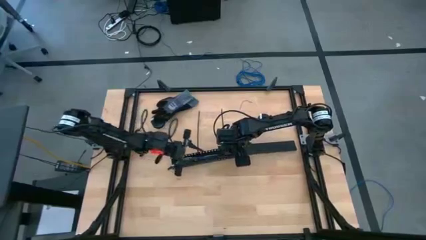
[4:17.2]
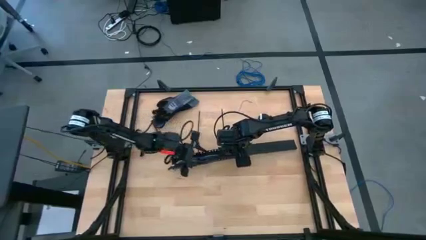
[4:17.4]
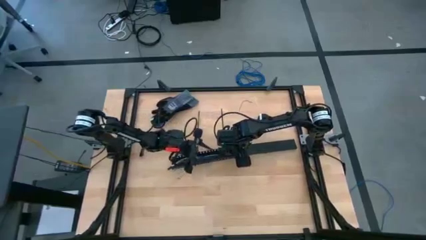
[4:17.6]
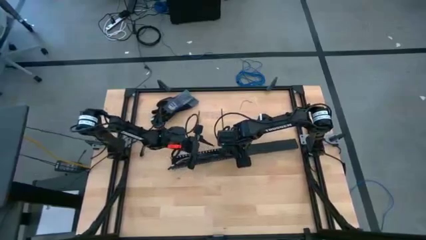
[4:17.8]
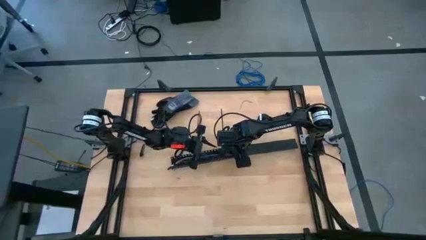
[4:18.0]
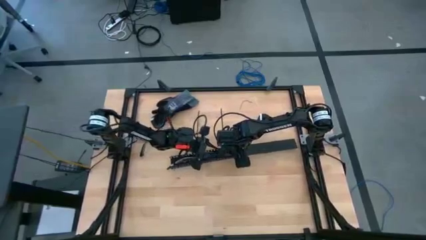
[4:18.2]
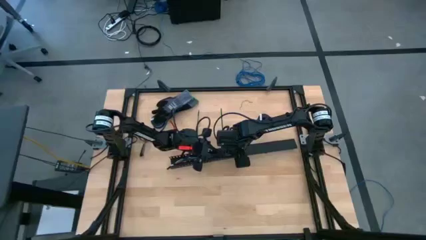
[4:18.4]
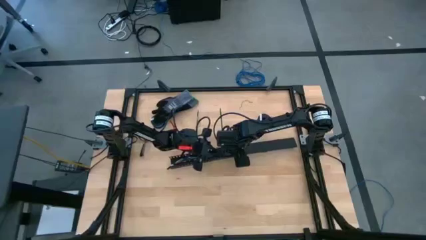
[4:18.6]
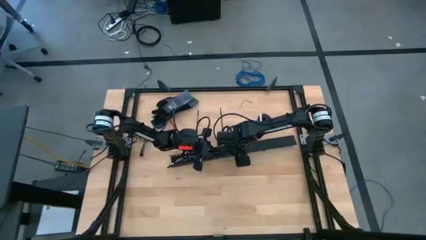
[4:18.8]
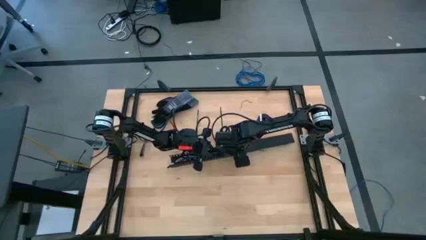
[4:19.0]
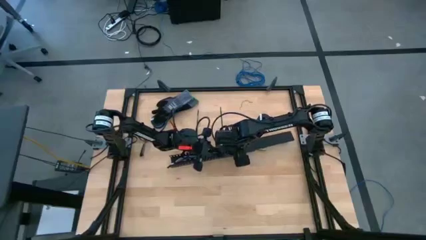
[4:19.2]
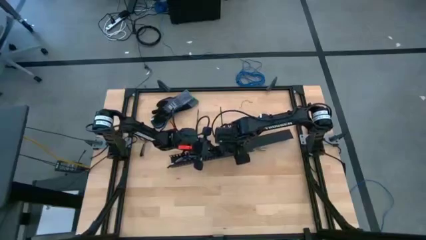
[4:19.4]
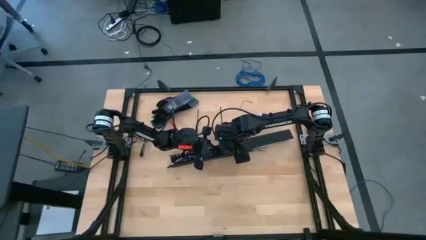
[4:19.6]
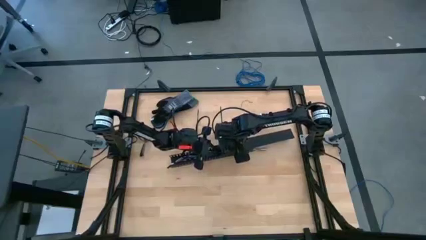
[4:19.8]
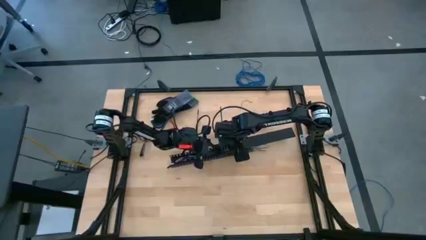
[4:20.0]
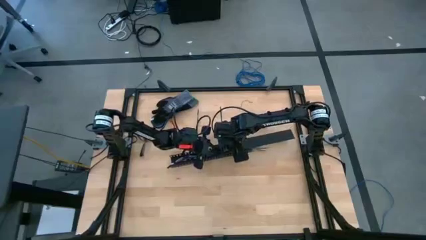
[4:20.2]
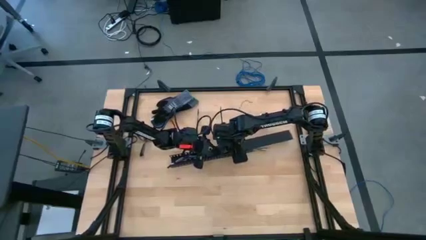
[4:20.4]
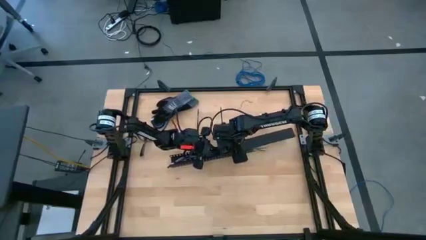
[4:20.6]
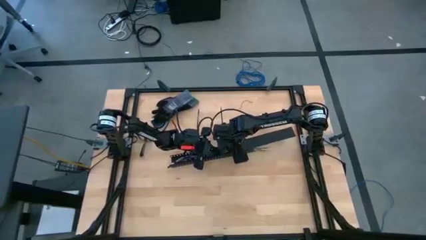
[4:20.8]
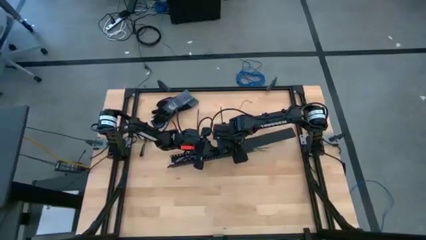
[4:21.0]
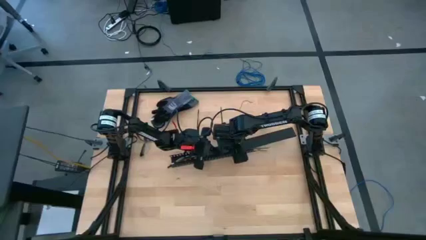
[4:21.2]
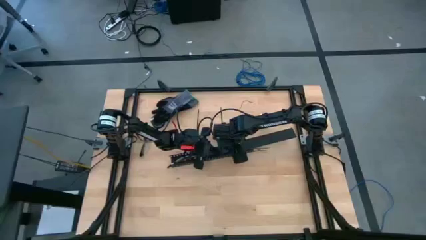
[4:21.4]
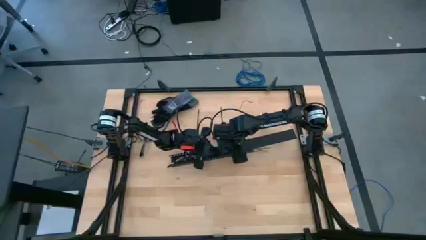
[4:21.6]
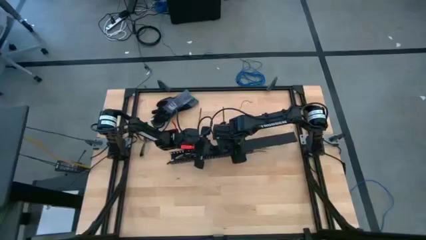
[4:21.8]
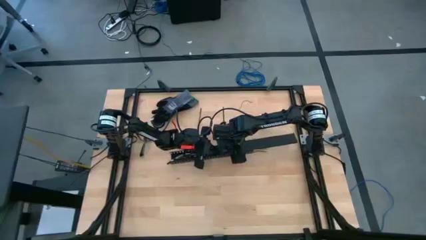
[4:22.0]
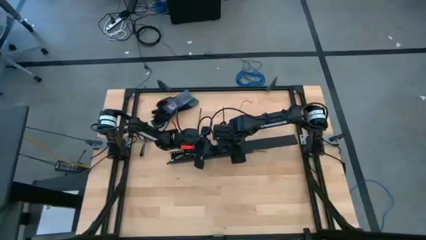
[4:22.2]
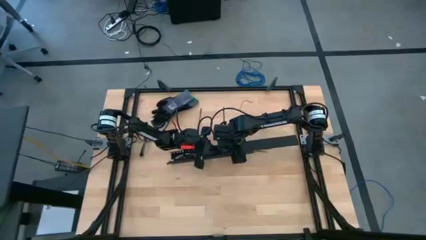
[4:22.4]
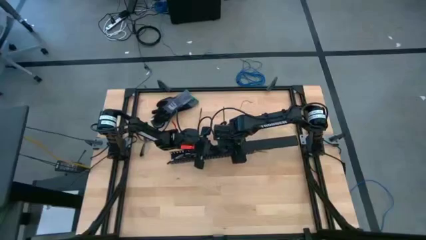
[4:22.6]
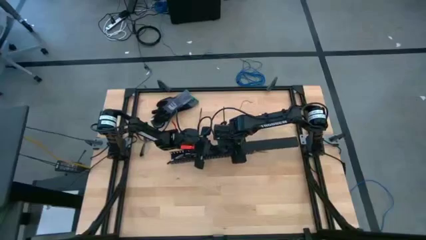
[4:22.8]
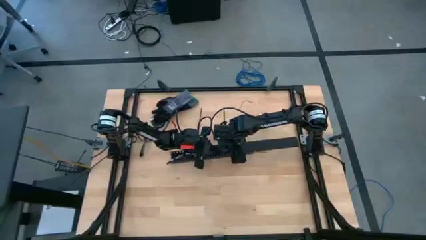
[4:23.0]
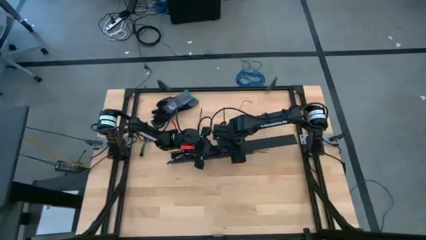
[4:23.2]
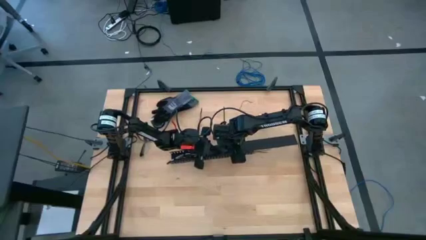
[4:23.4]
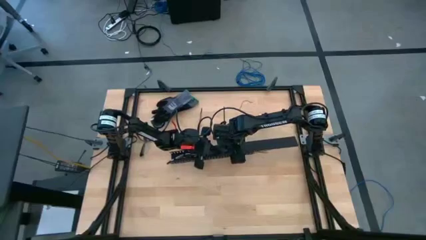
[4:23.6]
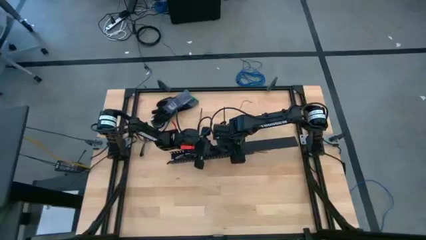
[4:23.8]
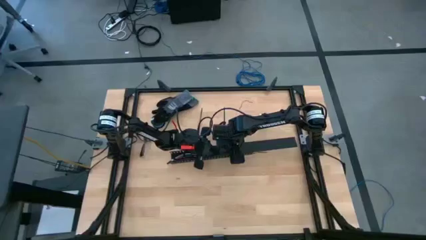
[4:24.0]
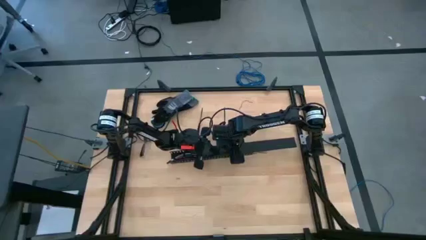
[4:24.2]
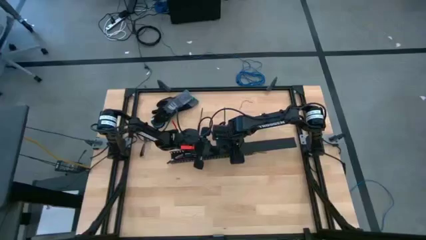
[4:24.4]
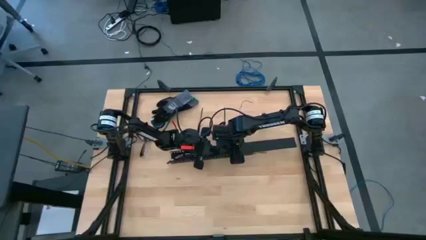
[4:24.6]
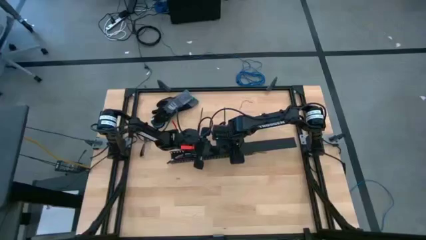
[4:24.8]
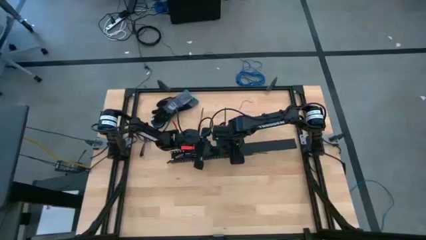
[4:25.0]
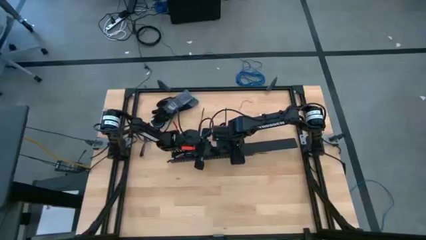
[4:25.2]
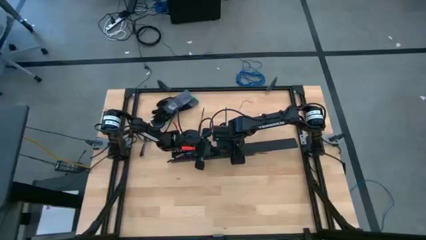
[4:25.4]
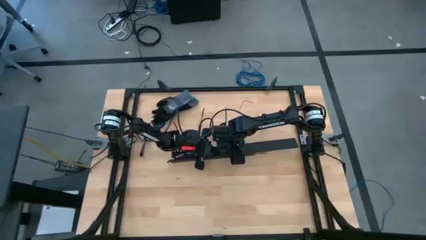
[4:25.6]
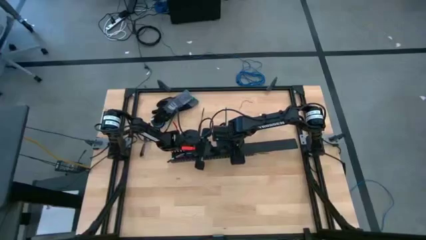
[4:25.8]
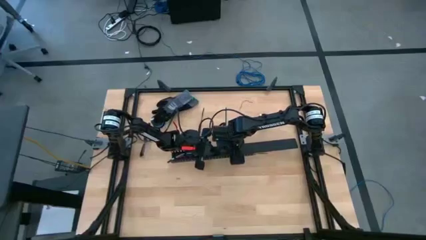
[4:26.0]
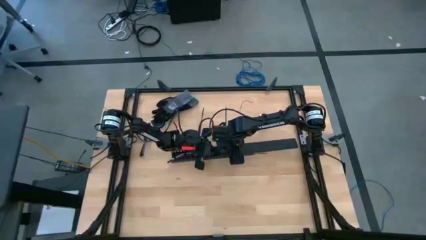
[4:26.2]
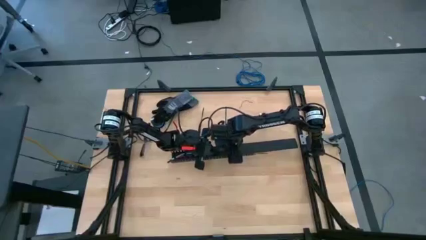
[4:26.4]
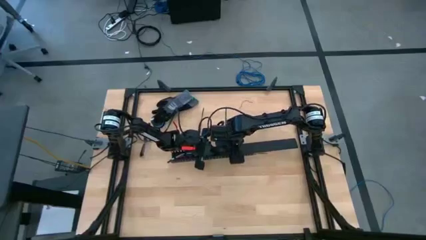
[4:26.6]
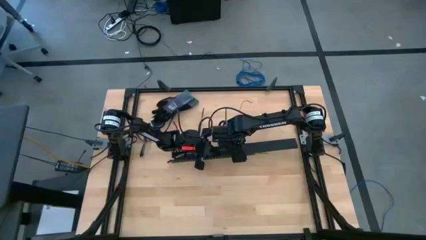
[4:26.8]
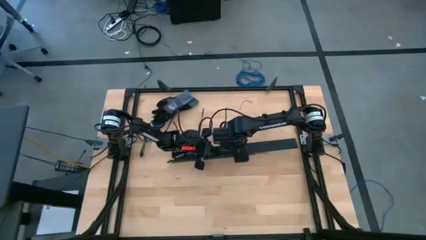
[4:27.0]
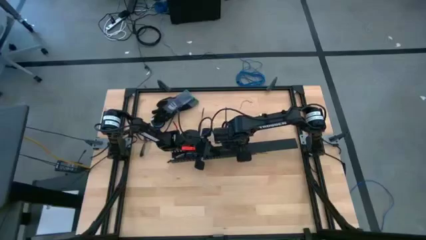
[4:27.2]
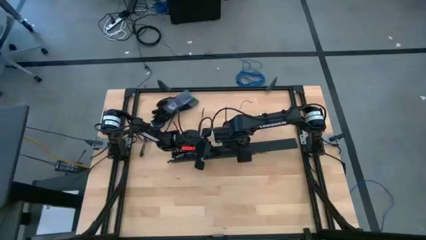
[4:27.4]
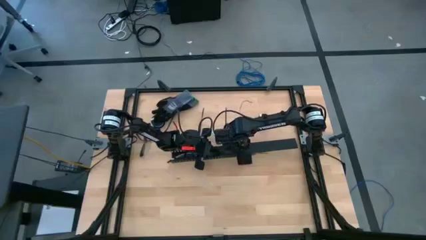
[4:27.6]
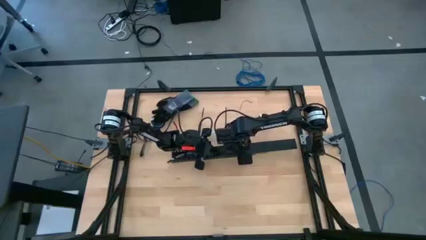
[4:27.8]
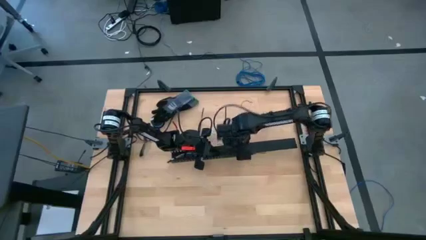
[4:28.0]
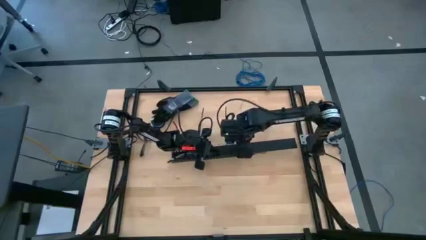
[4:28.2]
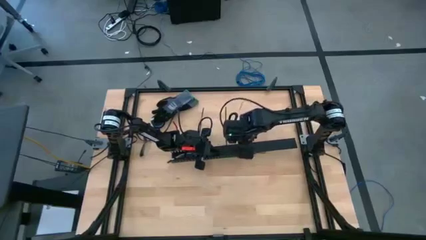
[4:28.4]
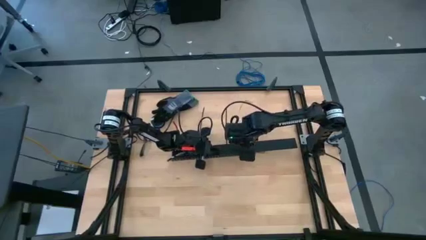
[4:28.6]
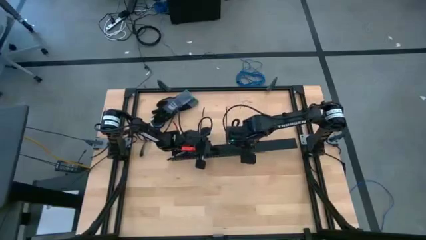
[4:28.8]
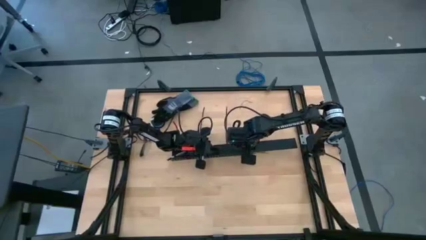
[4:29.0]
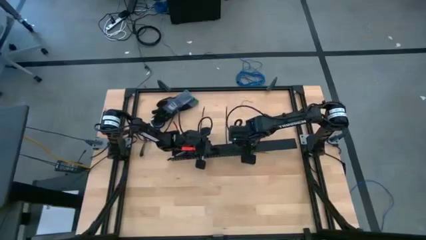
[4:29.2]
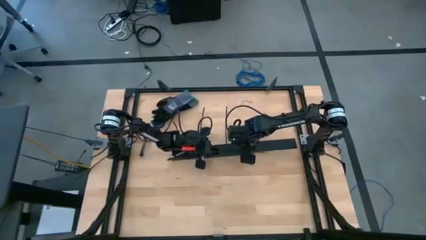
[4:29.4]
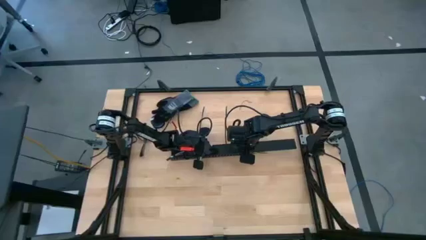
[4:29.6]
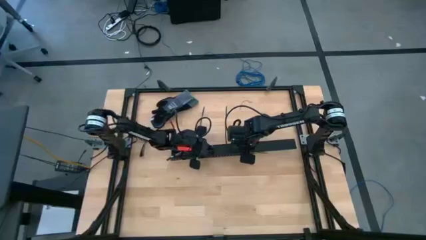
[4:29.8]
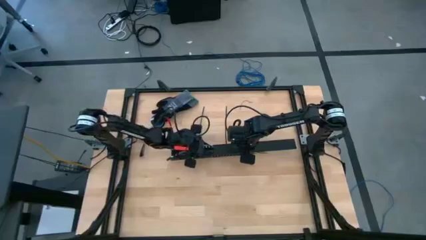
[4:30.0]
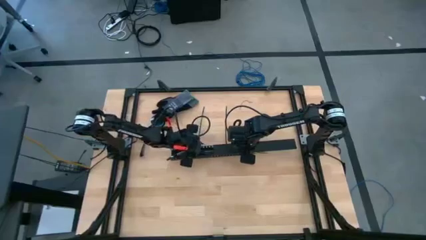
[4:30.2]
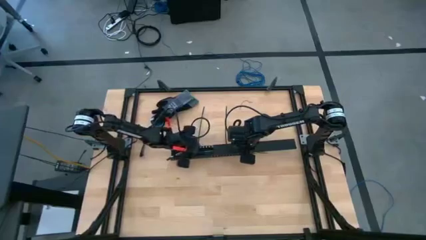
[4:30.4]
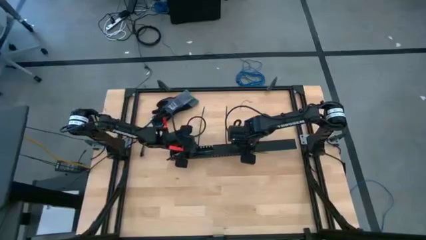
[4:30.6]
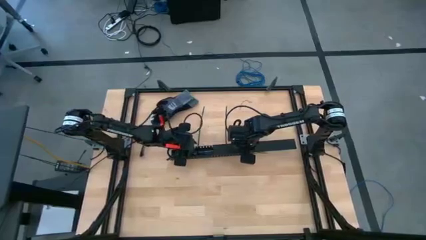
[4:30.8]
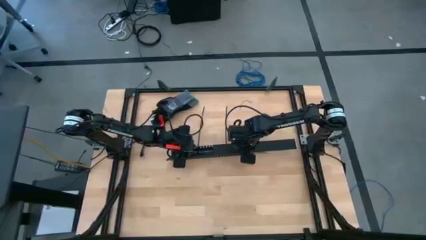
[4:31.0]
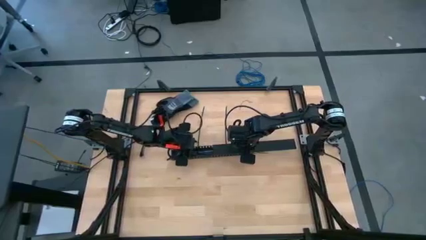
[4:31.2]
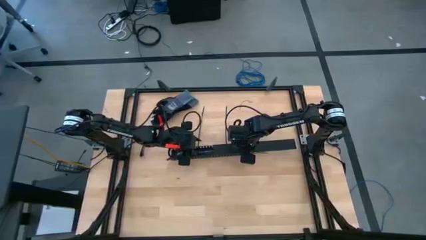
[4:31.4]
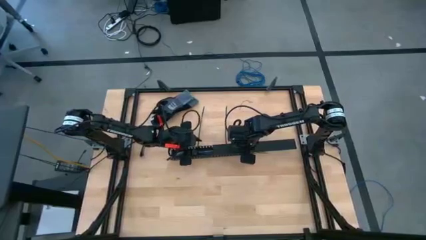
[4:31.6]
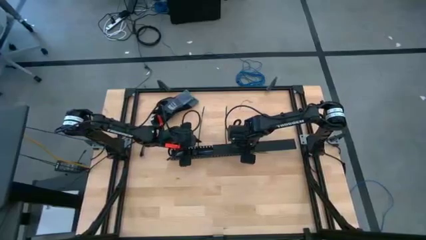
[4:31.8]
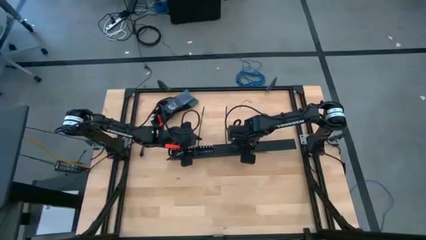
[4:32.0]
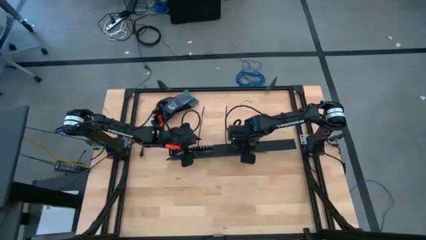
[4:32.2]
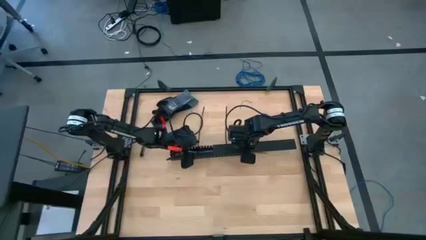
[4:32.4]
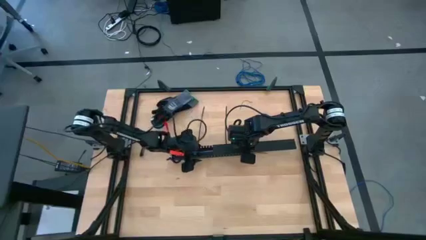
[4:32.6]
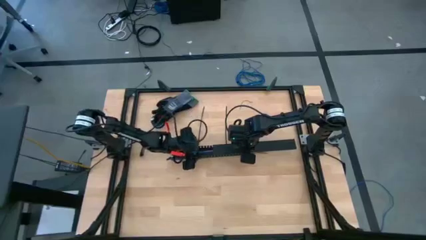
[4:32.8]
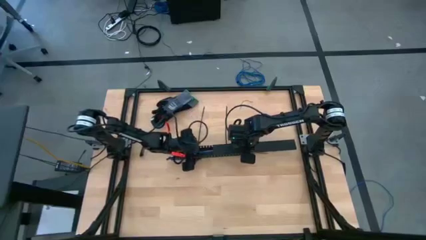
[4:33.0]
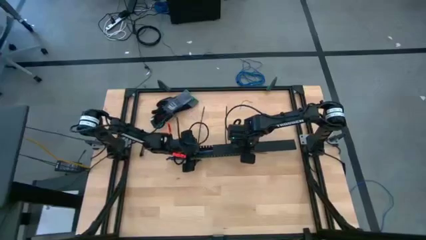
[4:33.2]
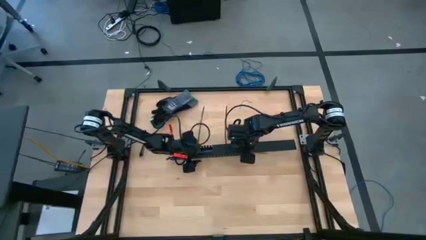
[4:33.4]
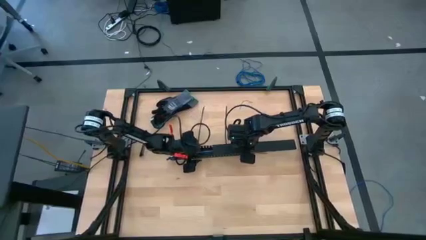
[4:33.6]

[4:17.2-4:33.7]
Task: Ziptie cables
Close the black cable duct
